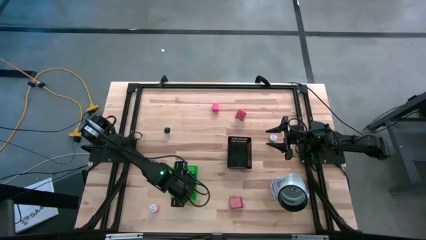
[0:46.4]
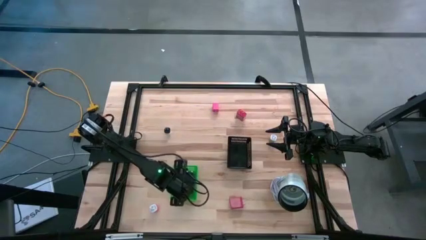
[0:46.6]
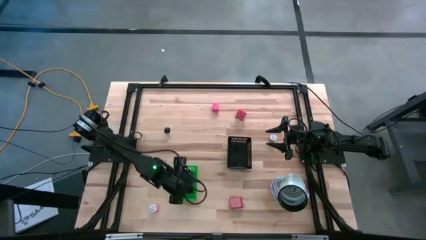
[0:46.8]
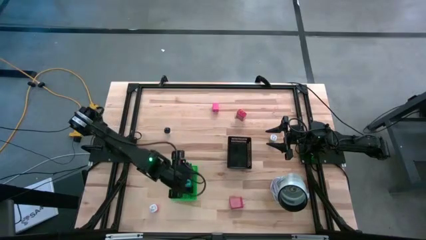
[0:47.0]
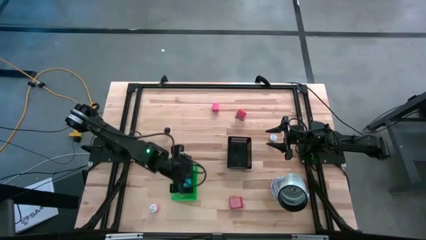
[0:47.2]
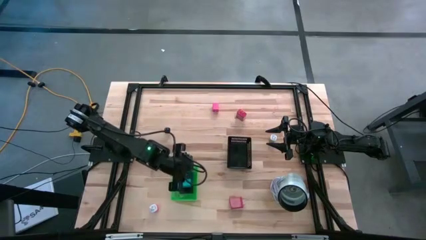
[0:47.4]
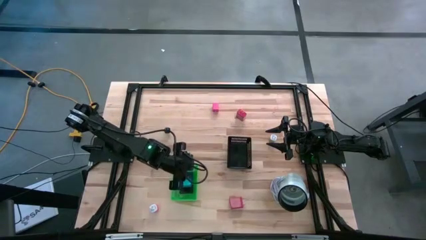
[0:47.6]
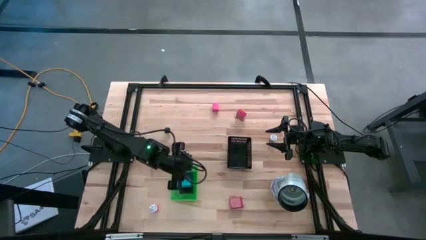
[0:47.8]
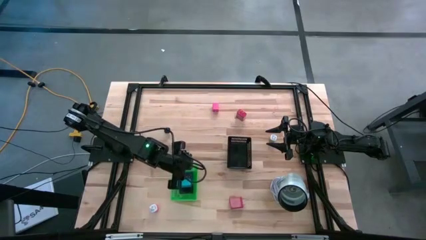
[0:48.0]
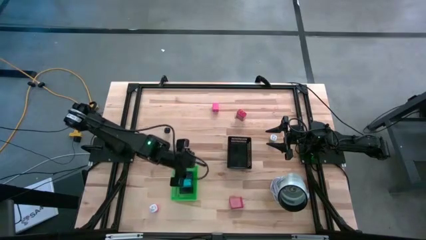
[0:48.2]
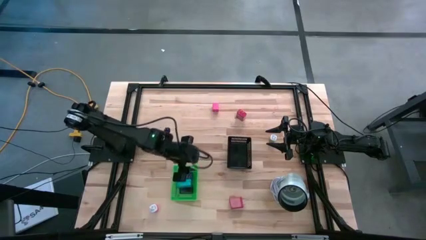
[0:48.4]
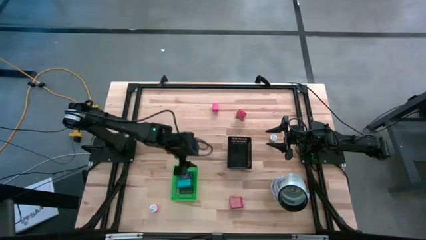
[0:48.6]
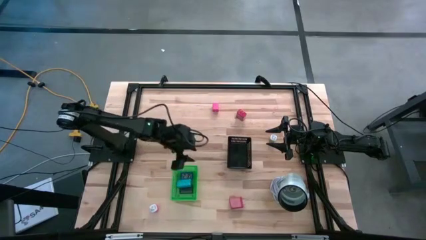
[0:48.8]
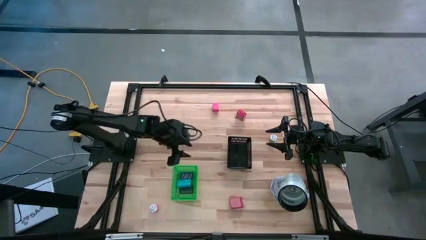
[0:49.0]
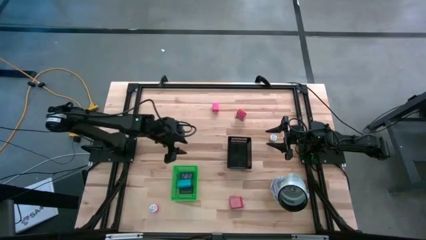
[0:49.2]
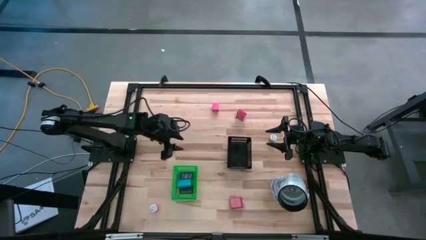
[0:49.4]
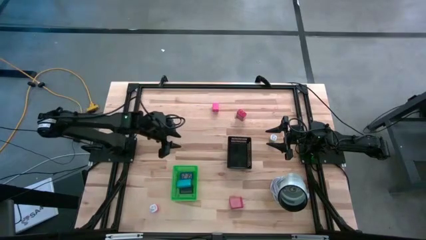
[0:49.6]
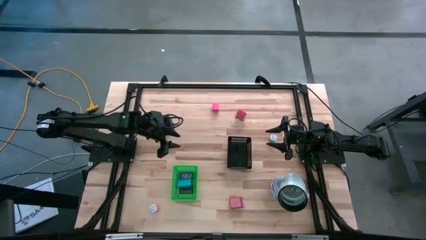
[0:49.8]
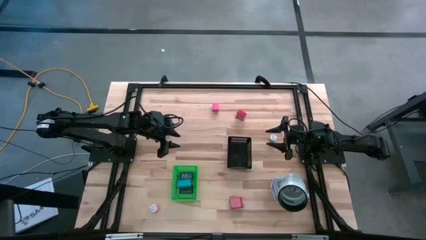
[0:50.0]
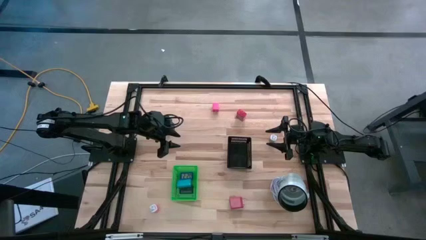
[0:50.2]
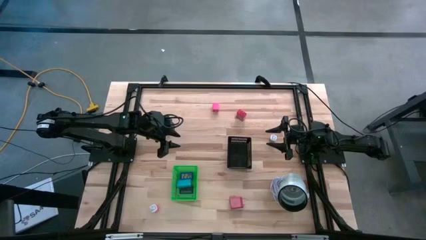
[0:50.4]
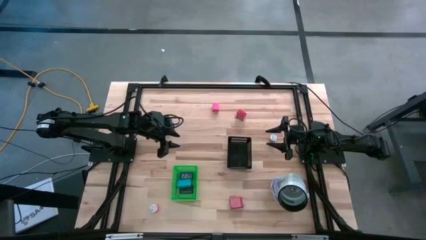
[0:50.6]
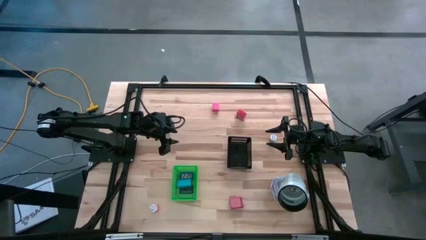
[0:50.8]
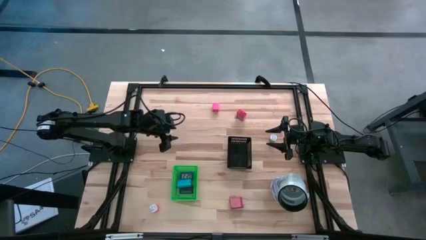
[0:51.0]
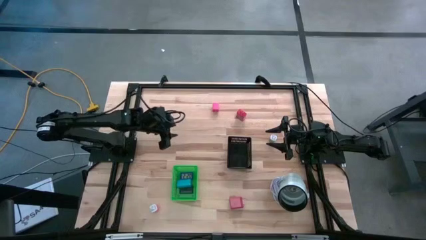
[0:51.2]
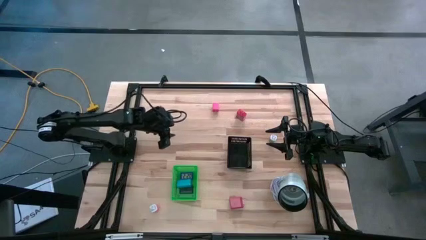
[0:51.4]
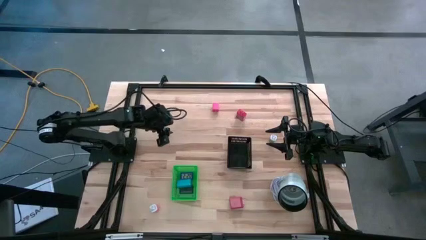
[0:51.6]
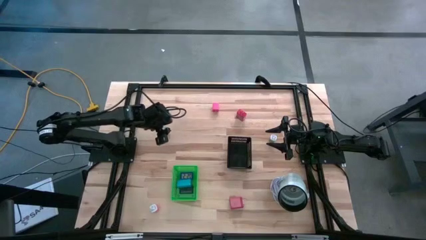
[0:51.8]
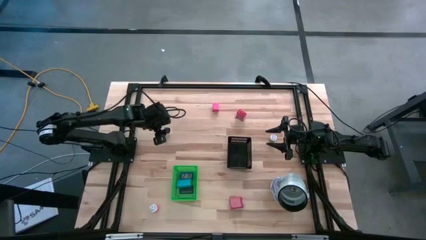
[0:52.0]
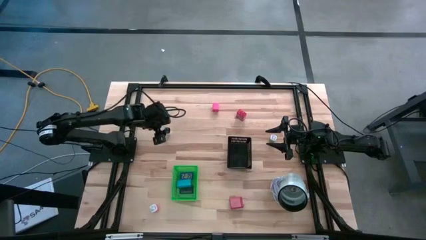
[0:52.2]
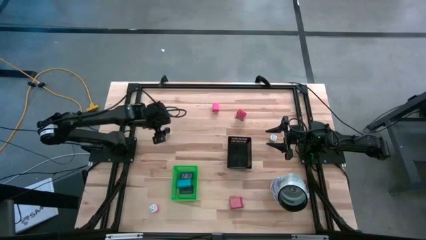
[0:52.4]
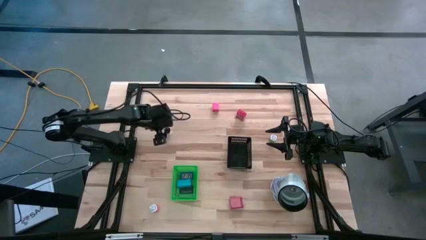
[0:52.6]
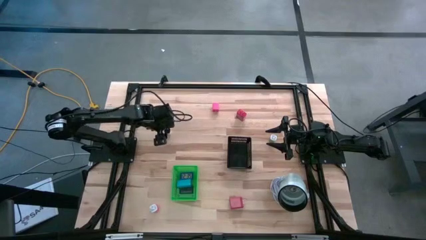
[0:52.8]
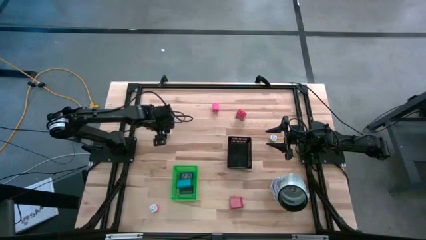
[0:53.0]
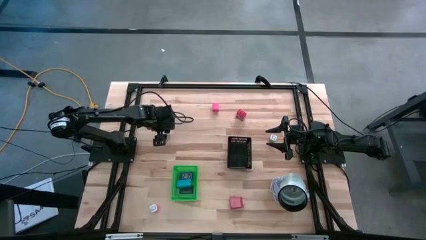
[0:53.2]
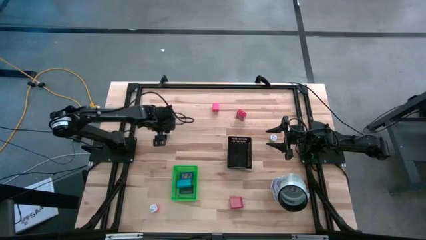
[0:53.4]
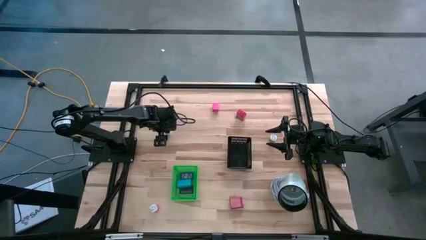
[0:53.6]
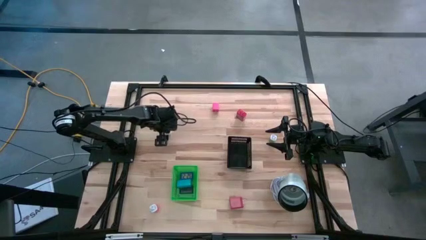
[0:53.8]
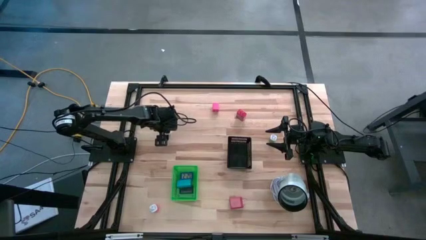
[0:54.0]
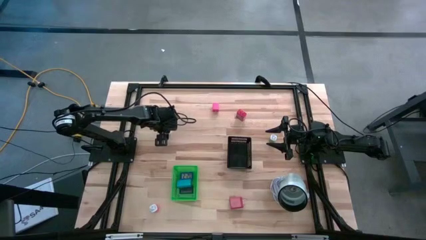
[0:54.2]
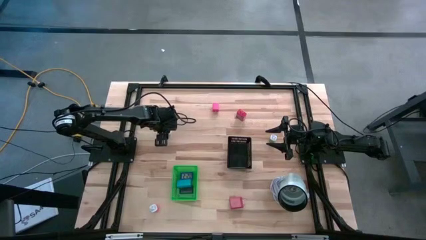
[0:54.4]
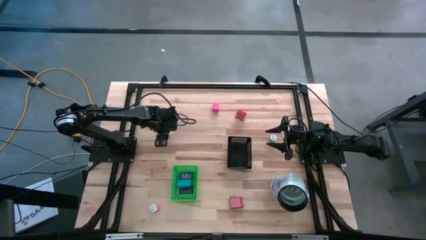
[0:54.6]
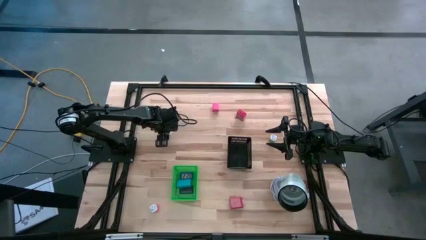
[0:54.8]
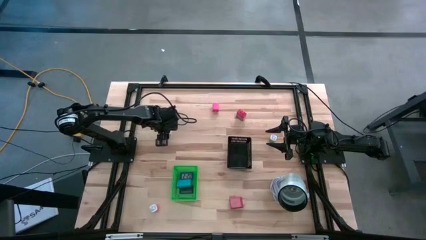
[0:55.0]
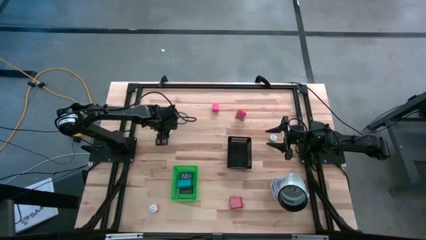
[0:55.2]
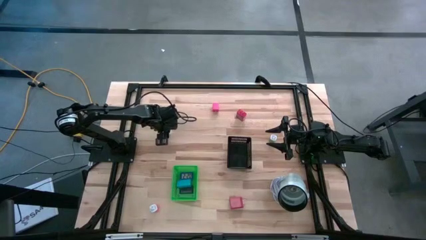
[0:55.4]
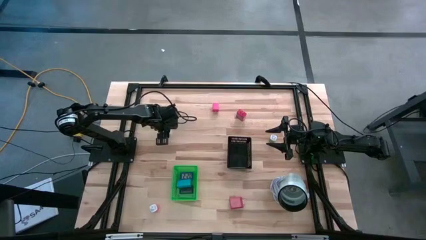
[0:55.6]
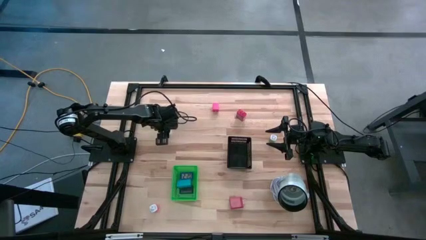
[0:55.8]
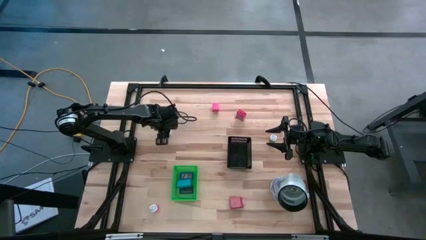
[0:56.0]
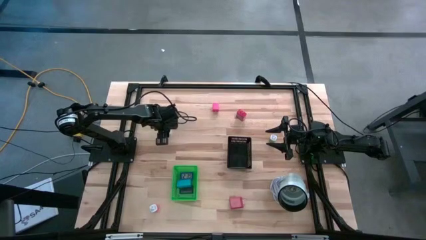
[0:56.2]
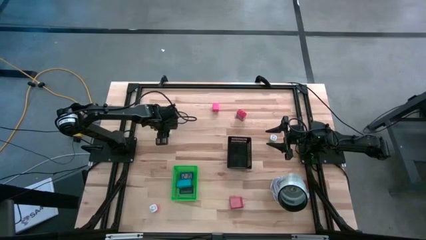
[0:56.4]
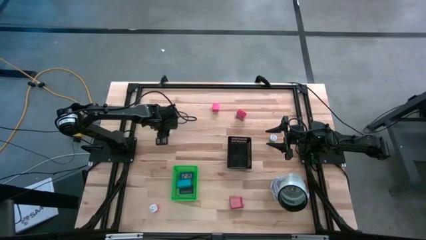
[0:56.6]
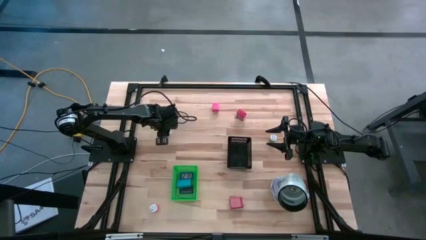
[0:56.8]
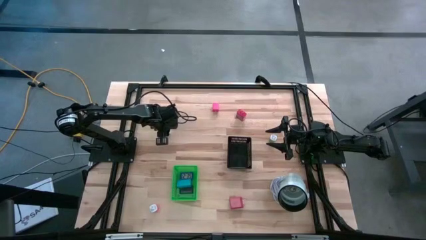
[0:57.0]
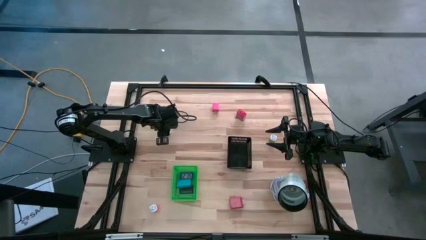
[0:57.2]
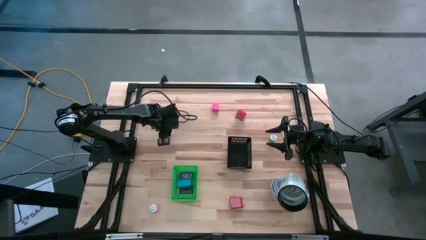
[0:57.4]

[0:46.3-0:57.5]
Task: Pick & Place Office items
Put the white charger adapter into the black bin
